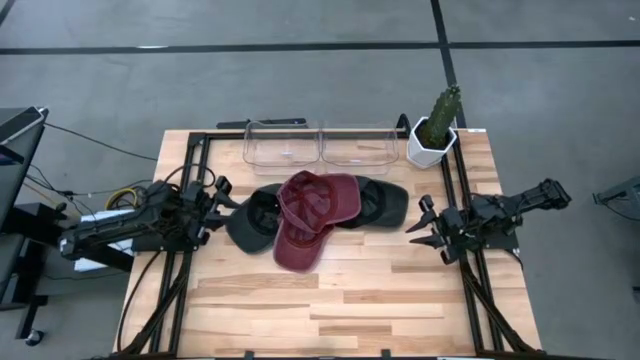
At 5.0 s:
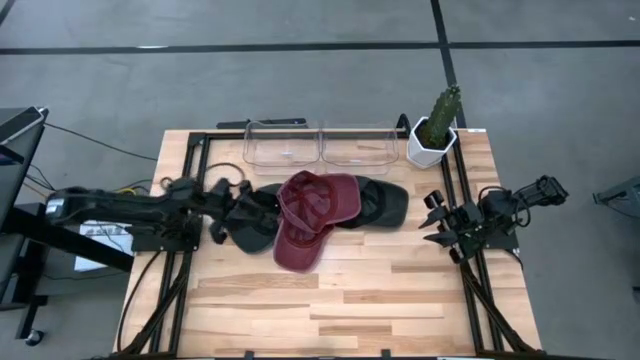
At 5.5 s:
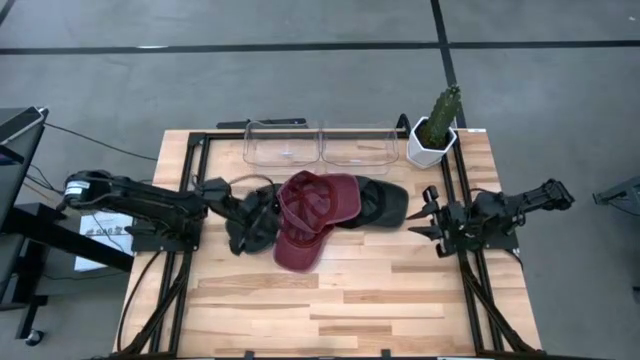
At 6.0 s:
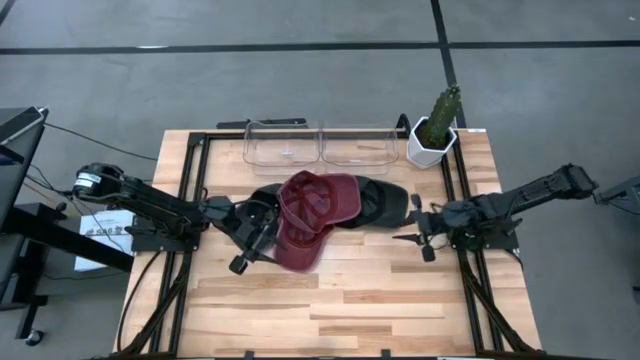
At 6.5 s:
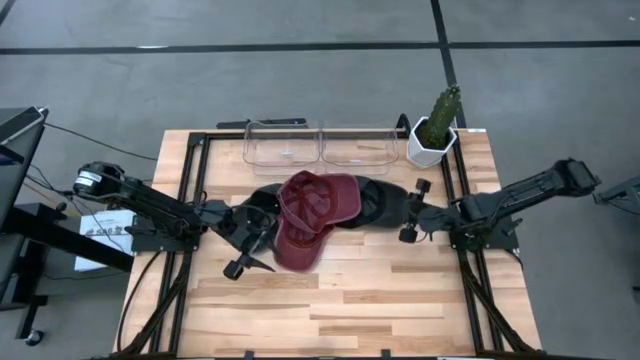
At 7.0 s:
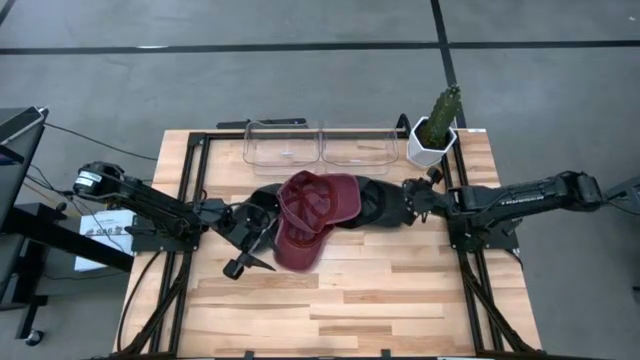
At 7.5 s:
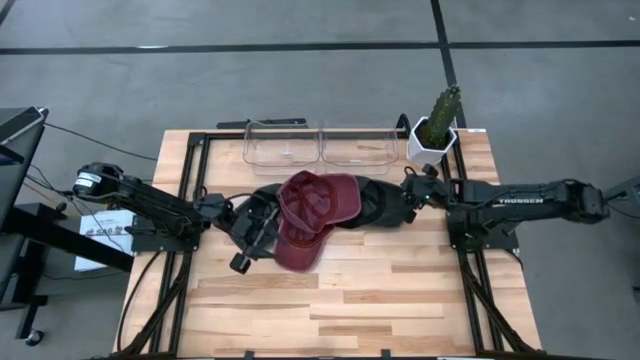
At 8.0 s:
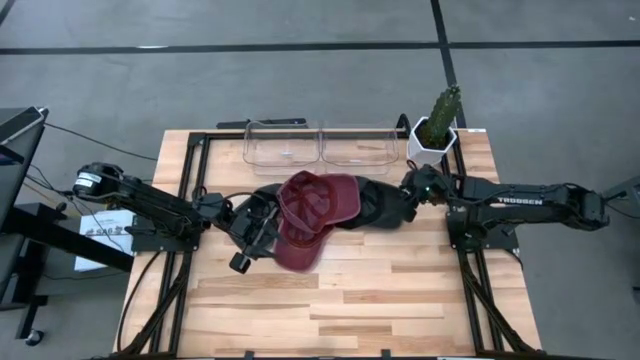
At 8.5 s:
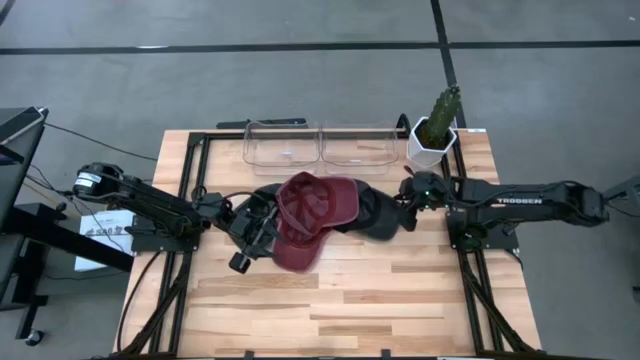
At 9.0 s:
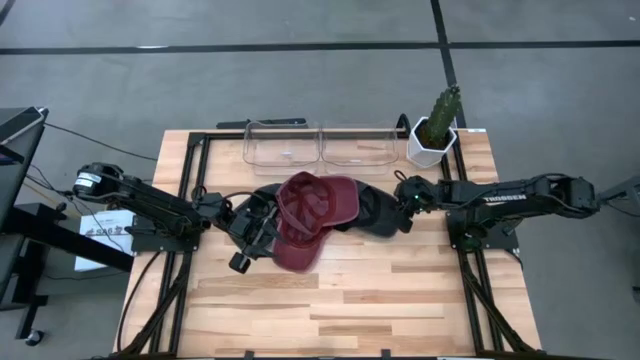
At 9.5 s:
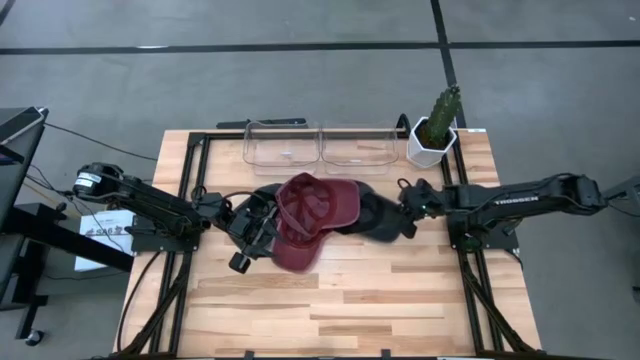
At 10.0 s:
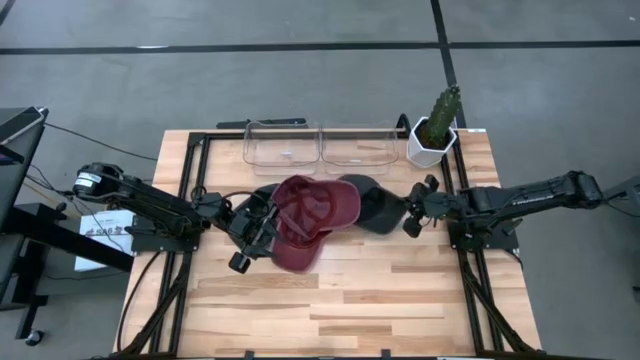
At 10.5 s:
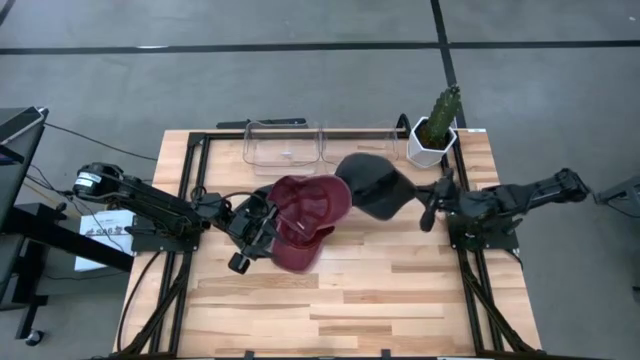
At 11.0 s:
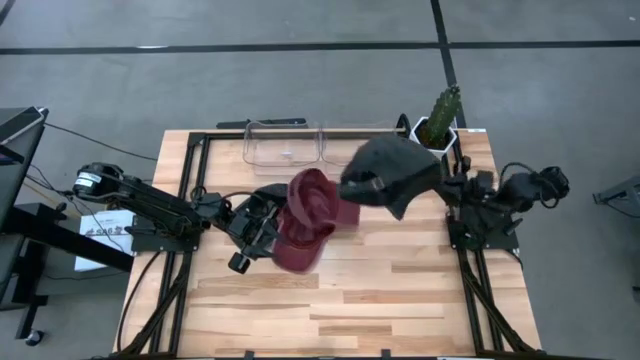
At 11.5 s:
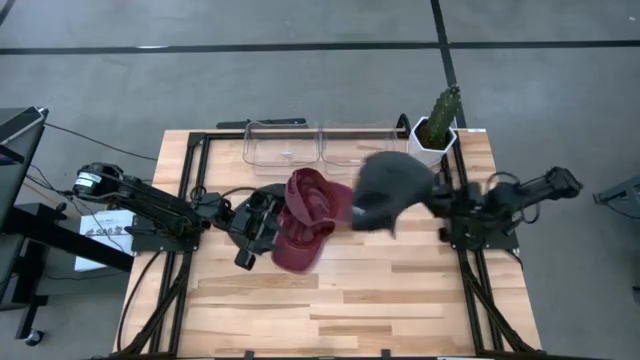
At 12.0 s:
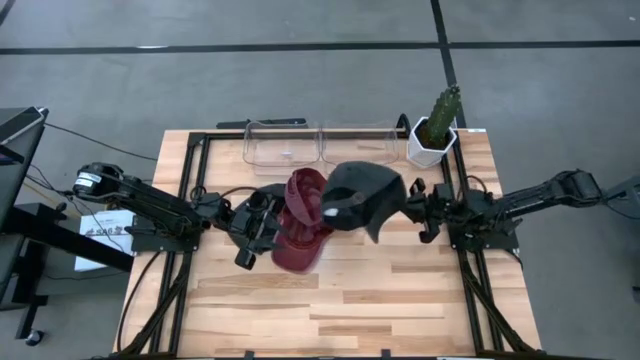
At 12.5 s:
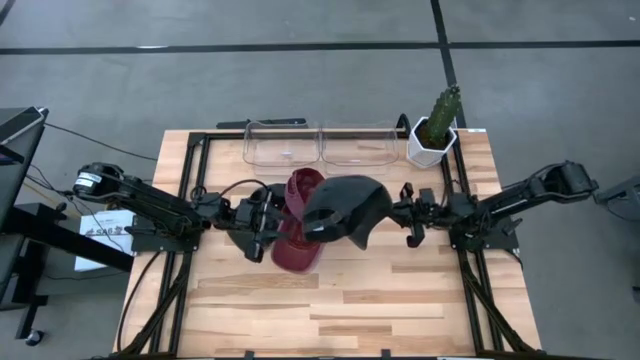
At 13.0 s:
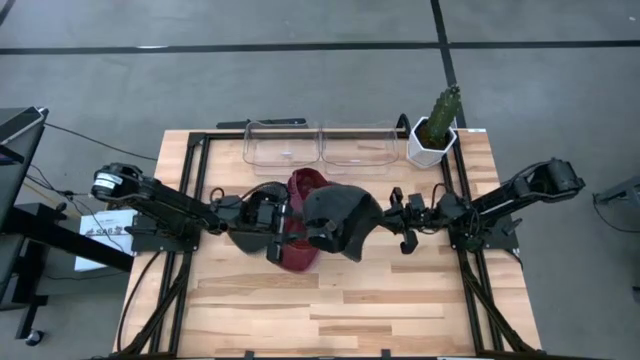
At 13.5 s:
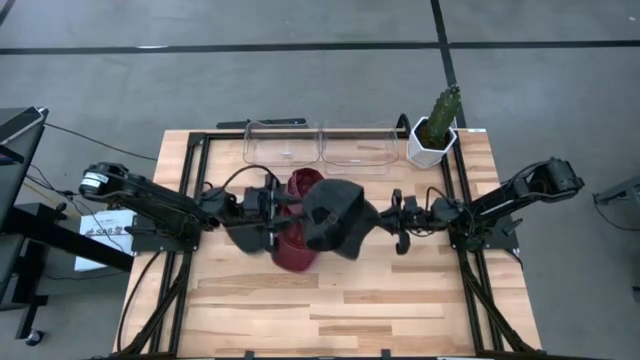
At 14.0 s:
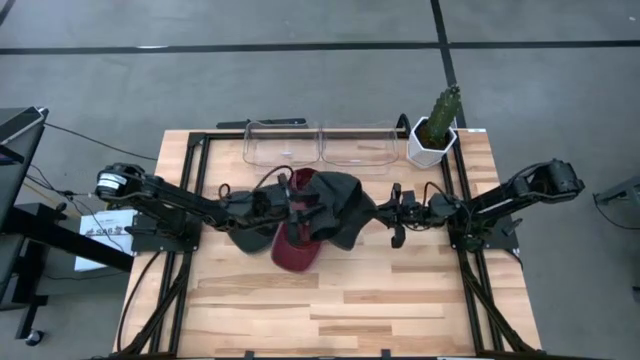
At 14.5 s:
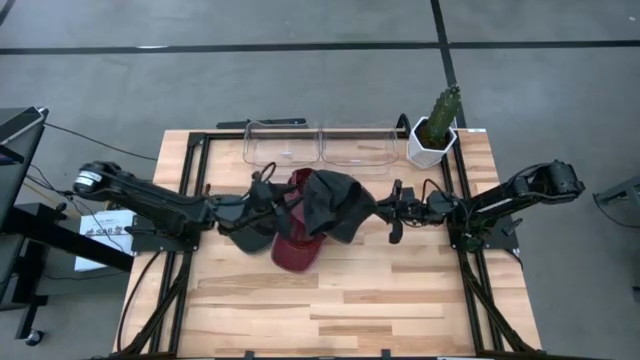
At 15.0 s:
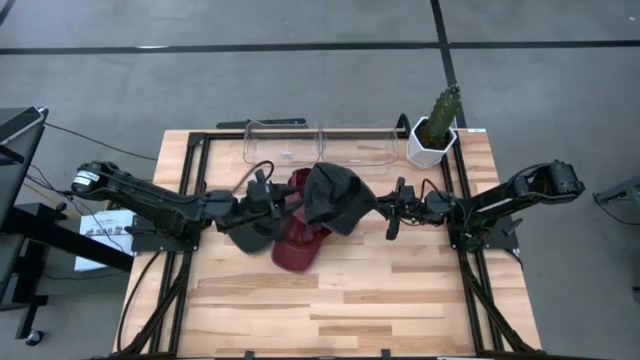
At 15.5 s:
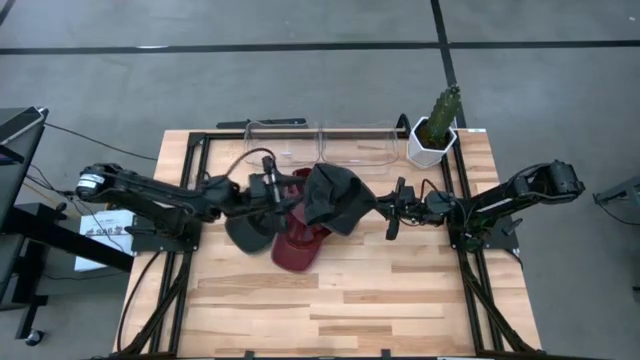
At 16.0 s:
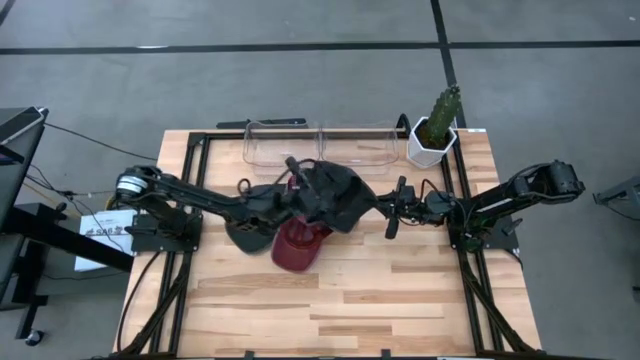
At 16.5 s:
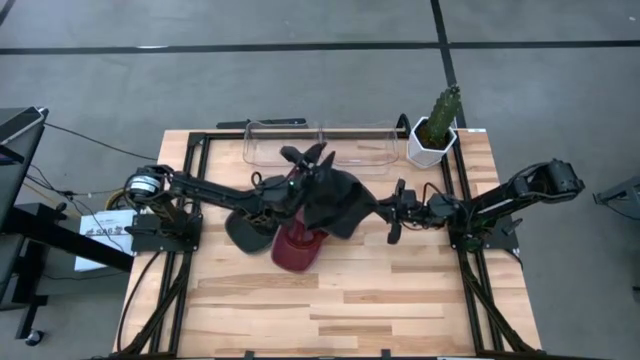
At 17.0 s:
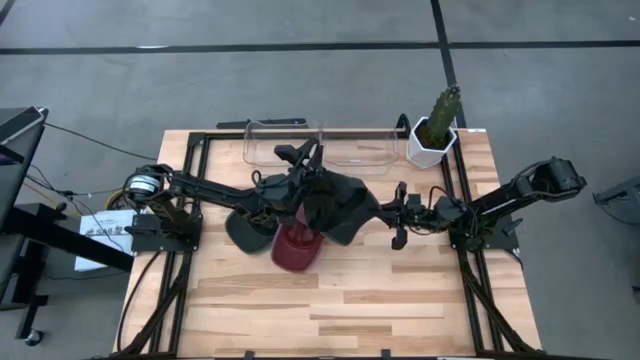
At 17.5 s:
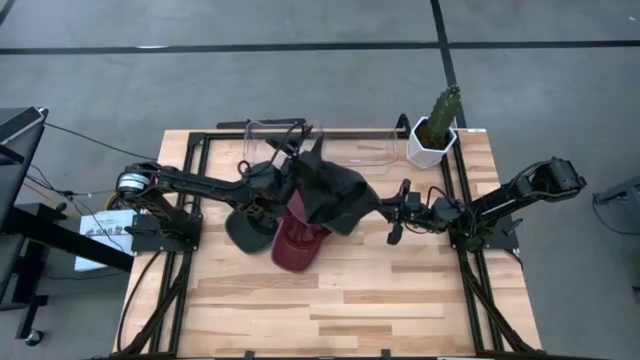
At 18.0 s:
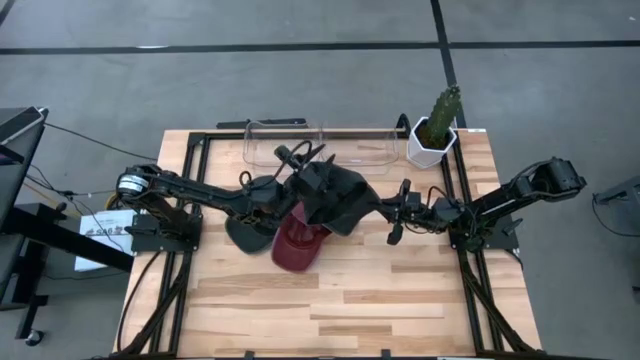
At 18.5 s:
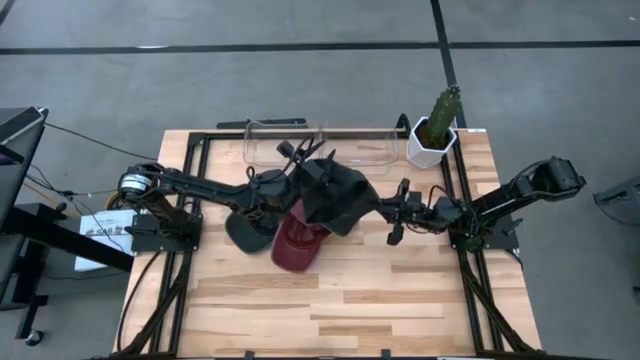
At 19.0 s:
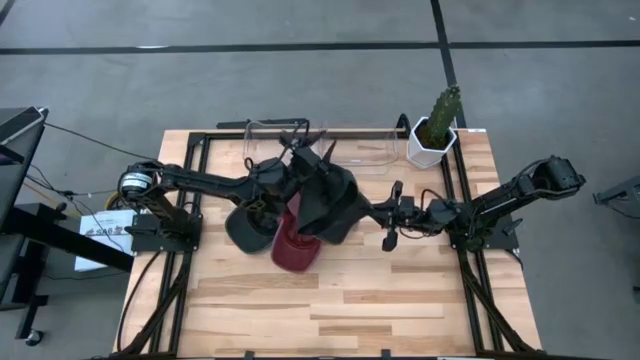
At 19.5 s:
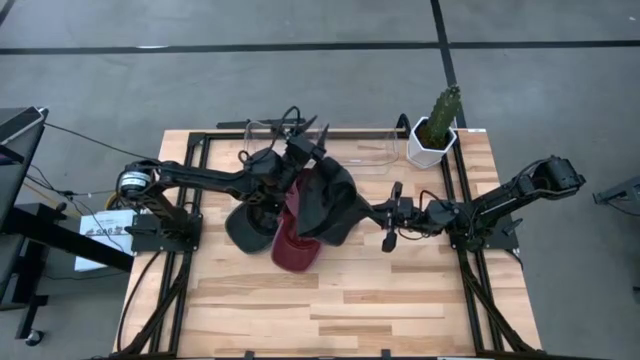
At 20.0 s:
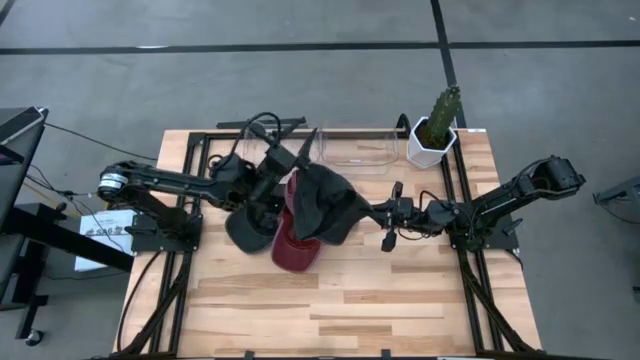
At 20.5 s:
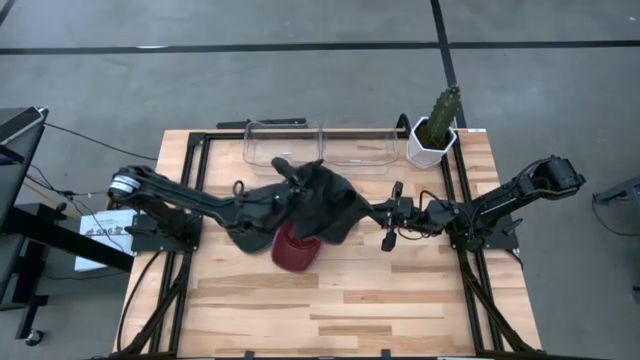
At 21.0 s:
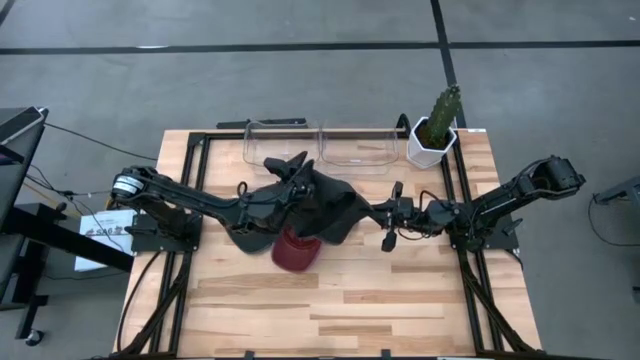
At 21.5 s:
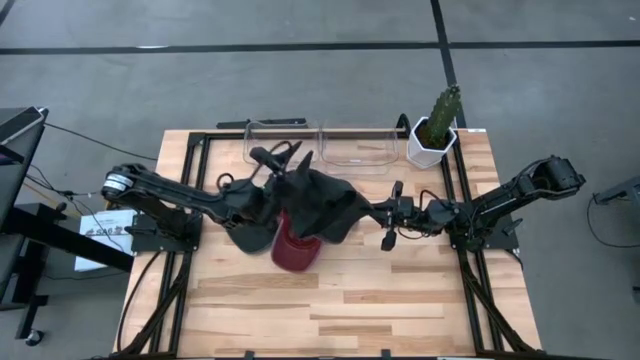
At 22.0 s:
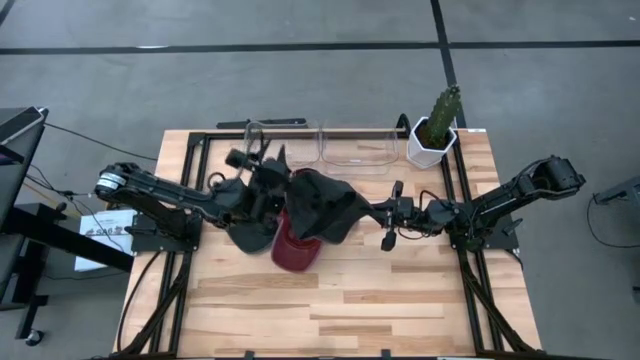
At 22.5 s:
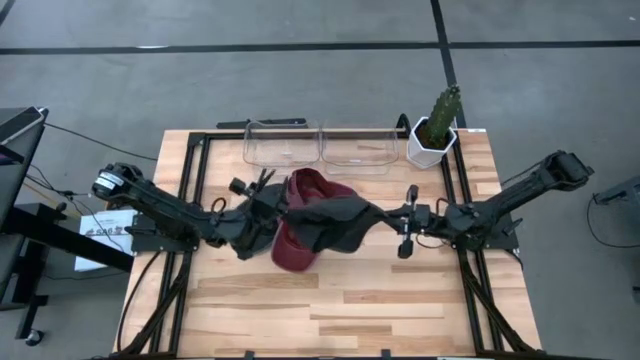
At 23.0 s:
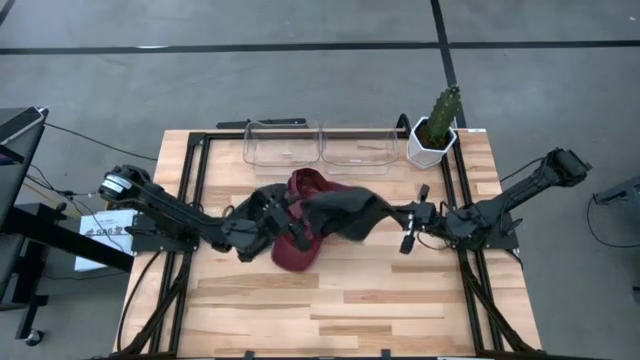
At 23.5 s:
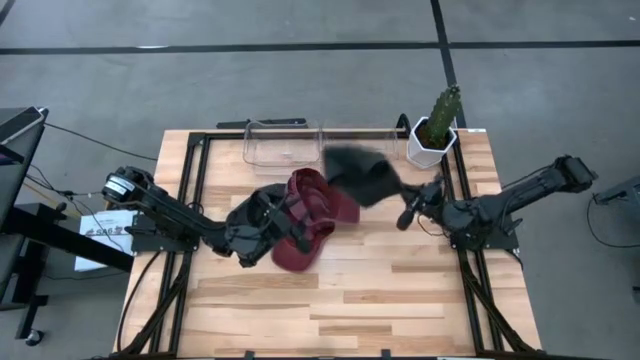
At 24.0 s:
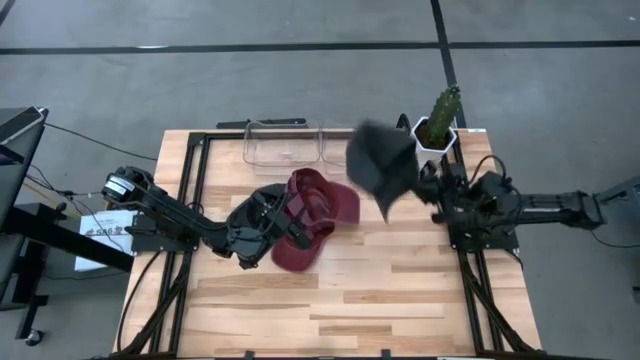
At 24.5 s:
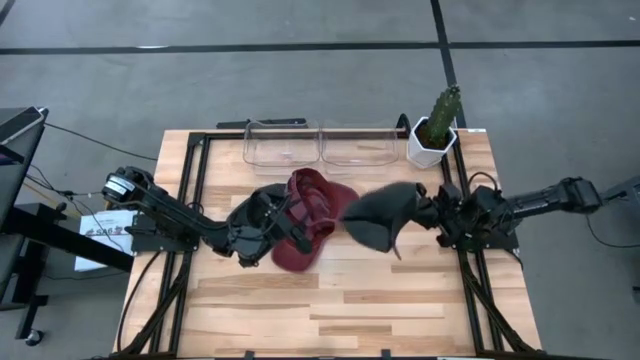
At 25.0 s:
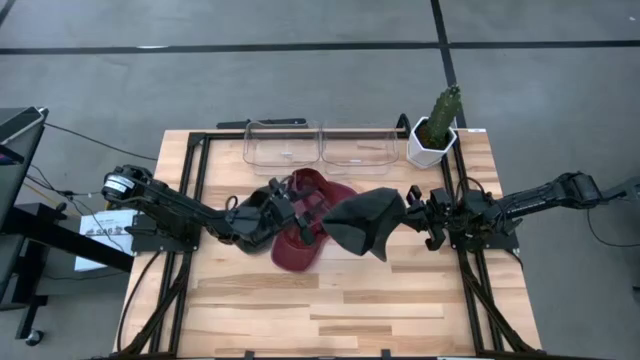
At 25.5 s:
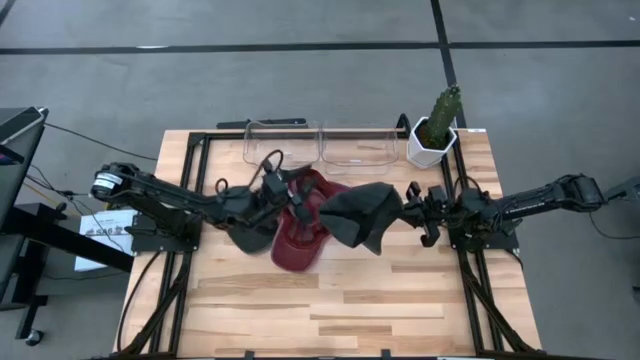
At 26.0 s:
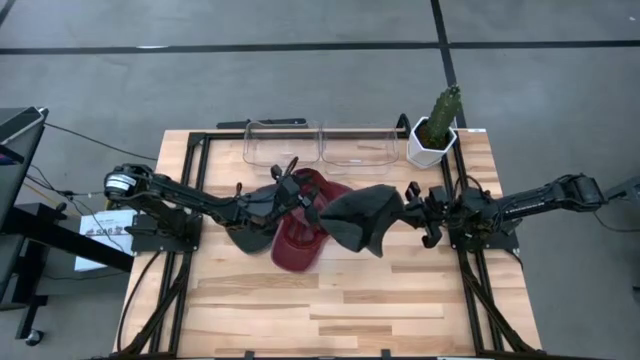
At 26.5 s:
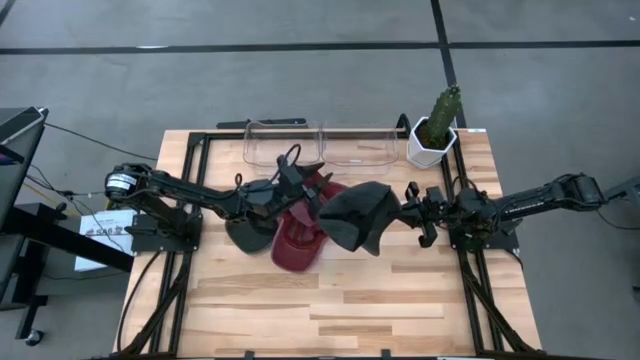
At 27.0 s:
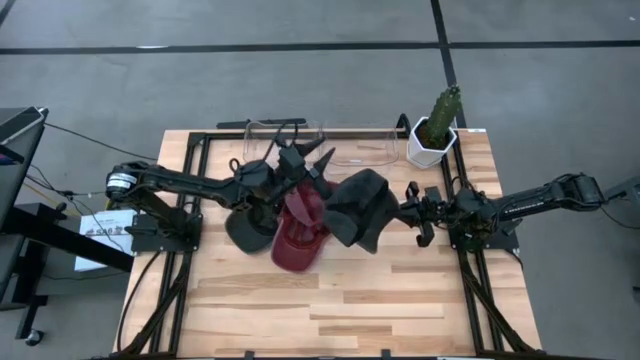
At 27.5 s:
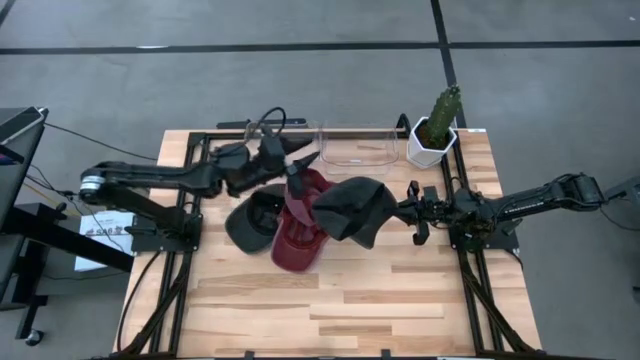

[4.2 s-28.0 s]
Task: Pick & Place hat
Put the right black cap into the left transparent bin
